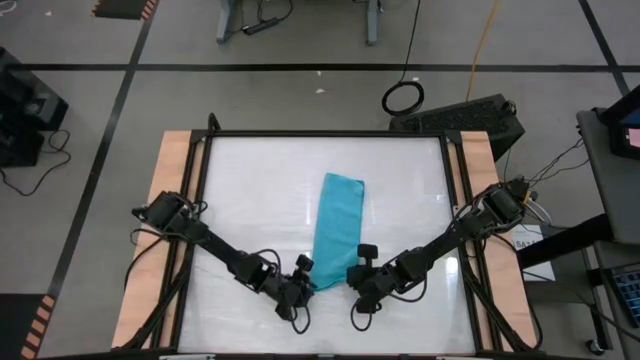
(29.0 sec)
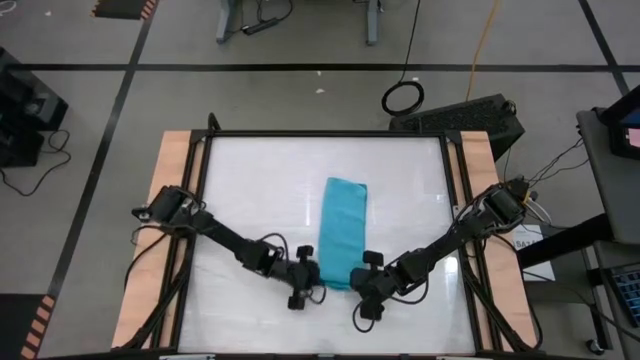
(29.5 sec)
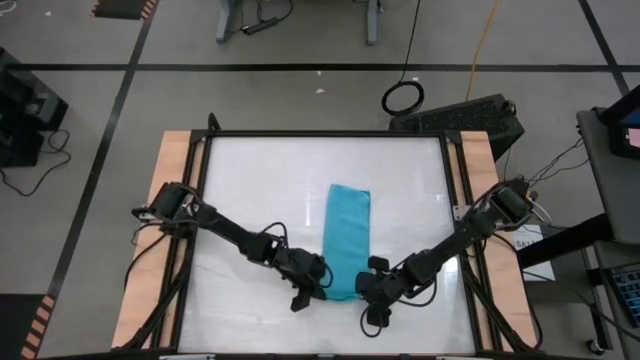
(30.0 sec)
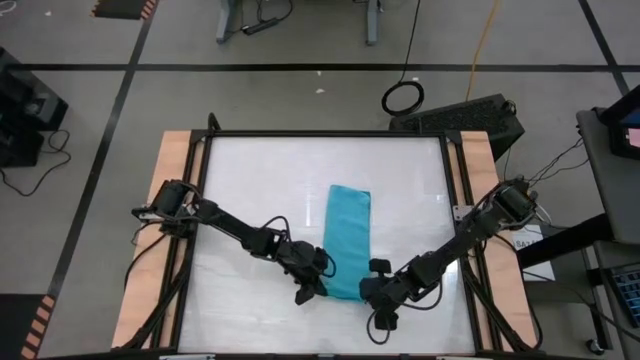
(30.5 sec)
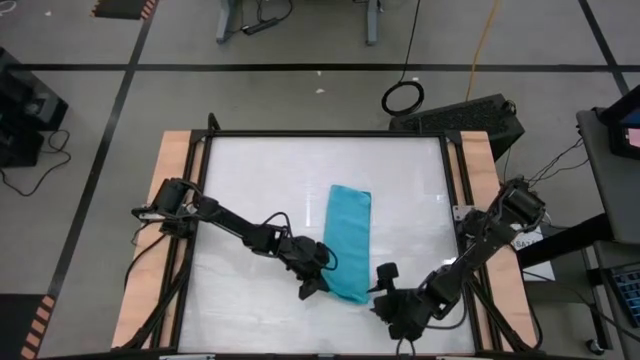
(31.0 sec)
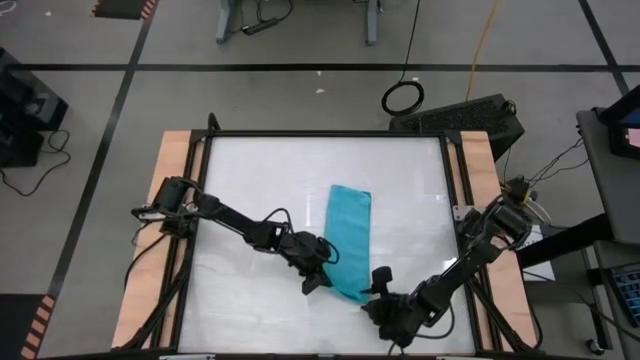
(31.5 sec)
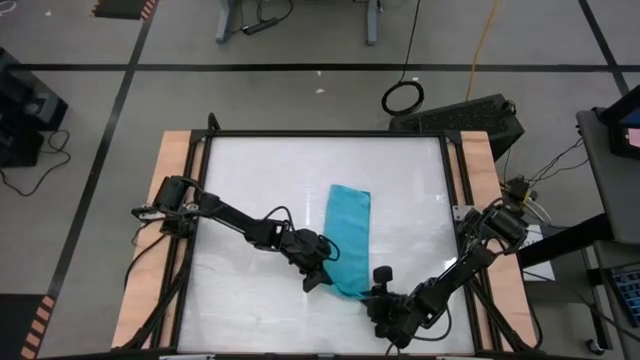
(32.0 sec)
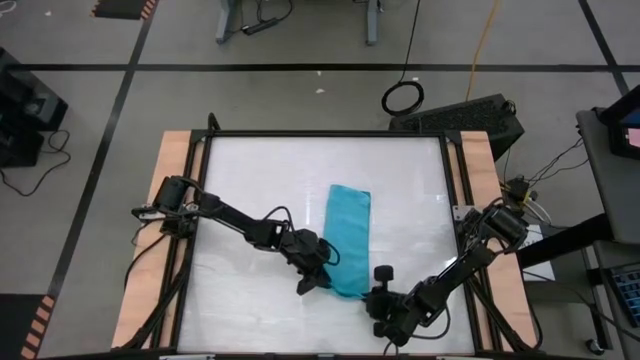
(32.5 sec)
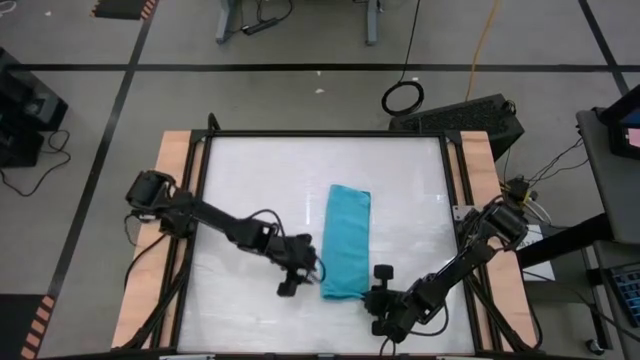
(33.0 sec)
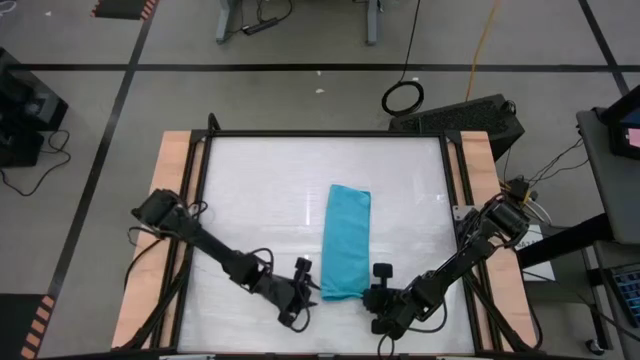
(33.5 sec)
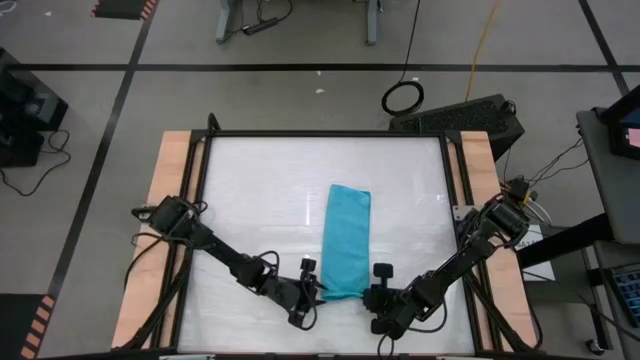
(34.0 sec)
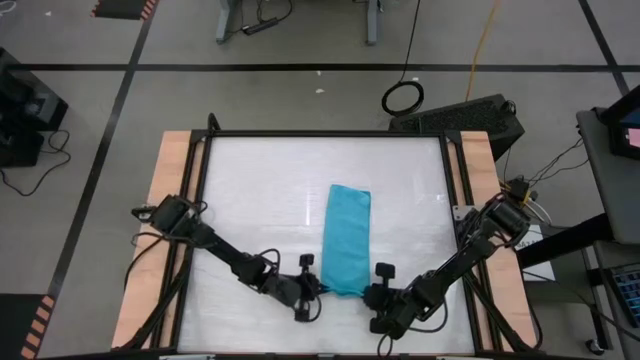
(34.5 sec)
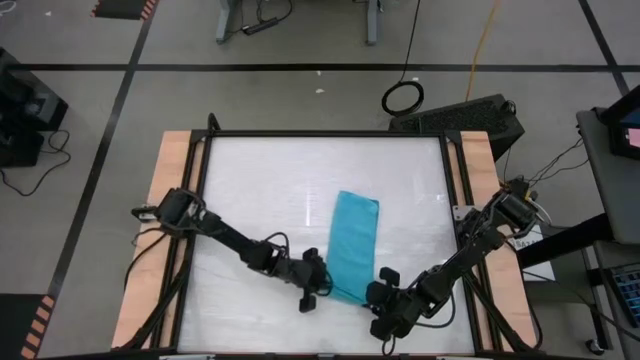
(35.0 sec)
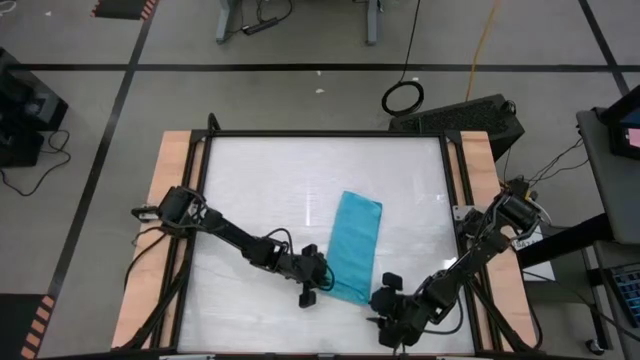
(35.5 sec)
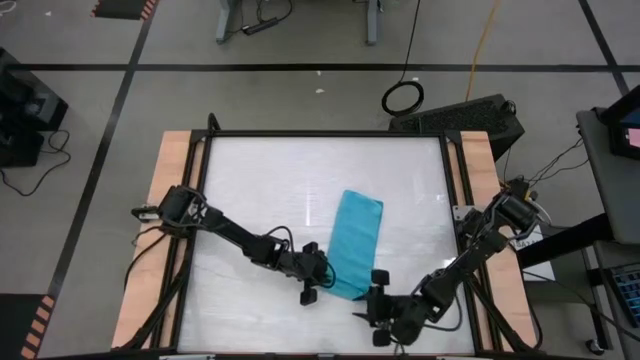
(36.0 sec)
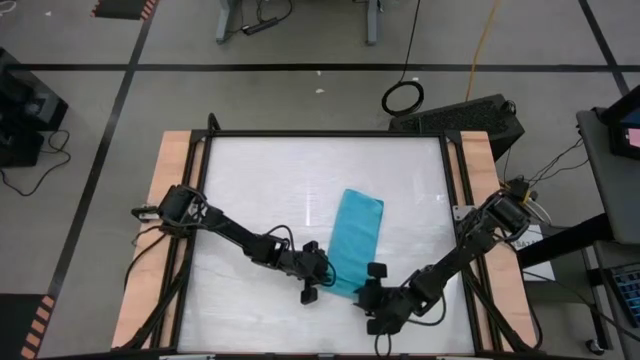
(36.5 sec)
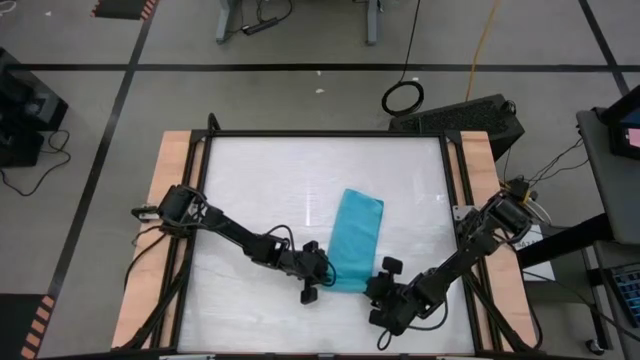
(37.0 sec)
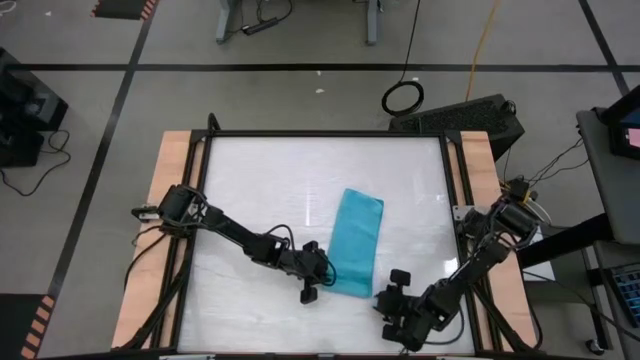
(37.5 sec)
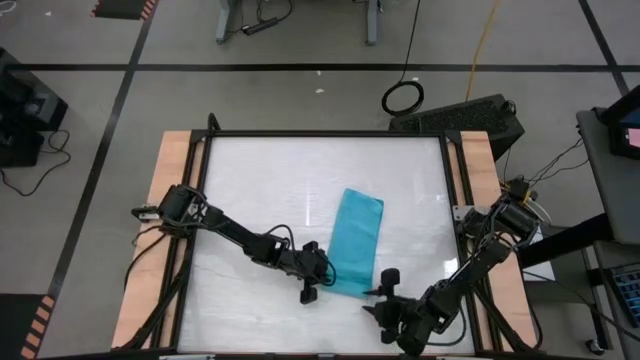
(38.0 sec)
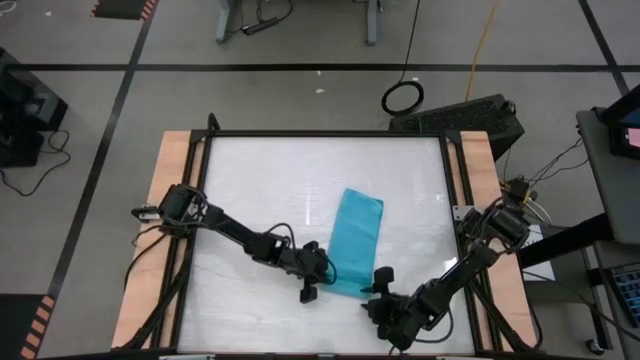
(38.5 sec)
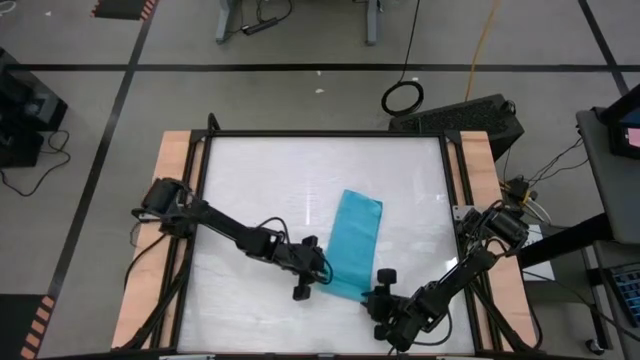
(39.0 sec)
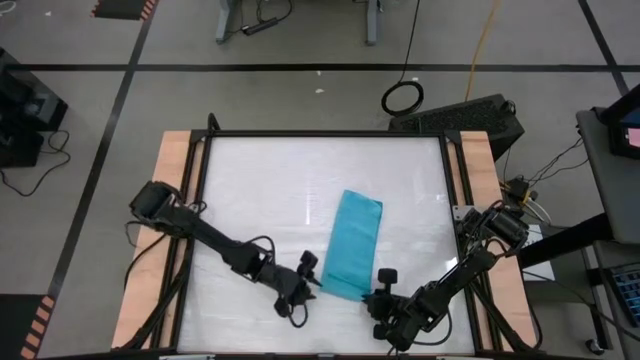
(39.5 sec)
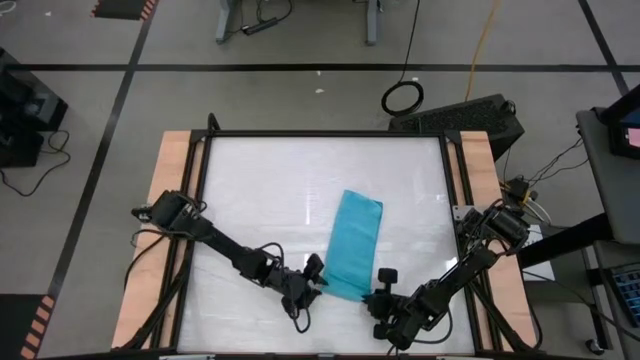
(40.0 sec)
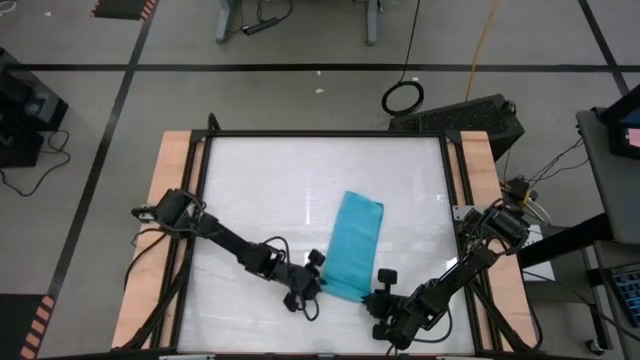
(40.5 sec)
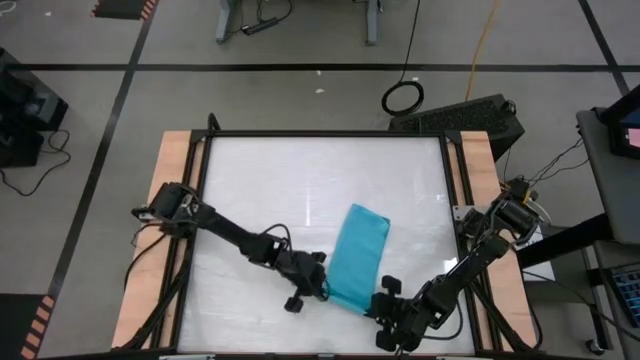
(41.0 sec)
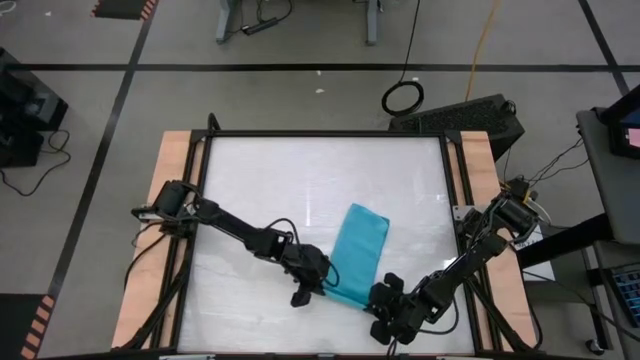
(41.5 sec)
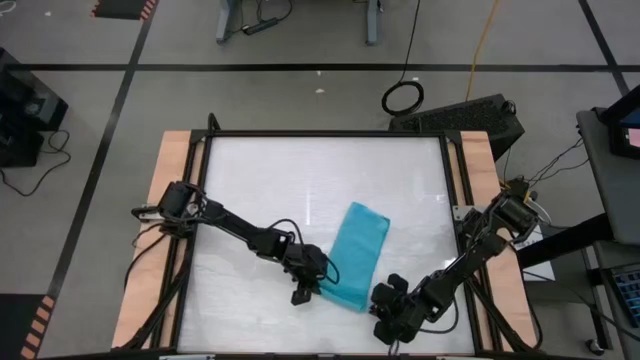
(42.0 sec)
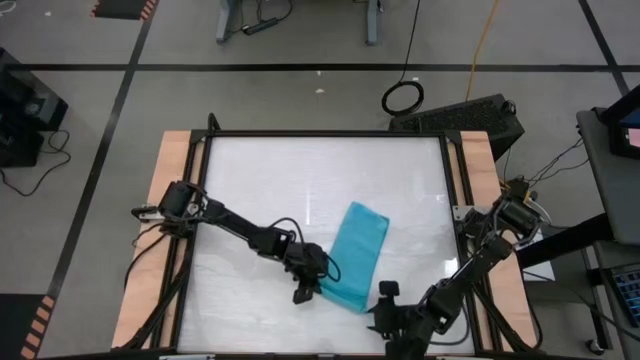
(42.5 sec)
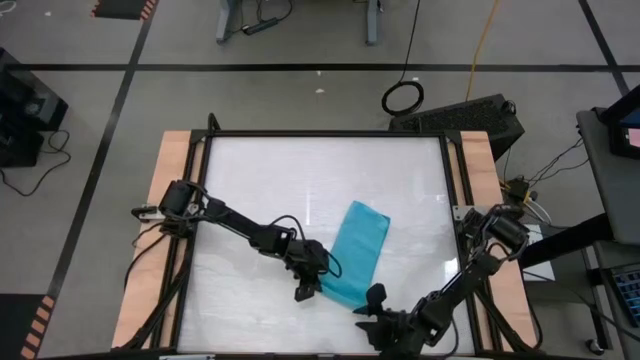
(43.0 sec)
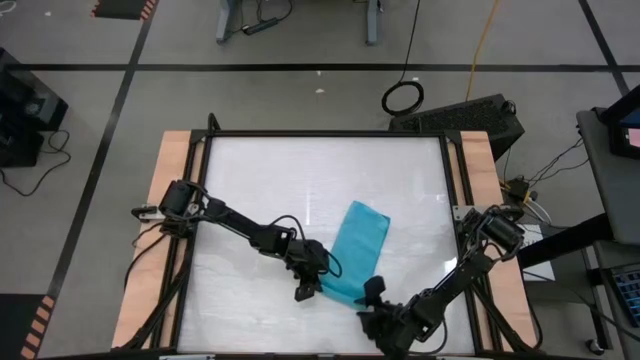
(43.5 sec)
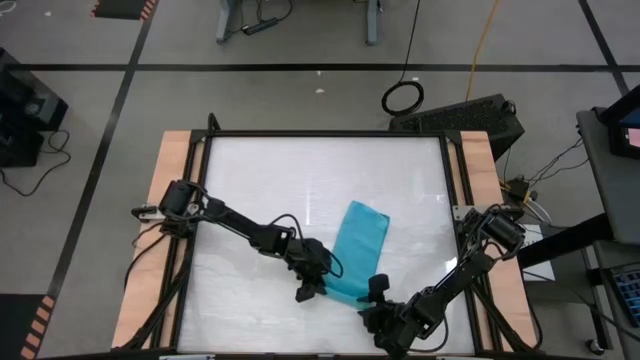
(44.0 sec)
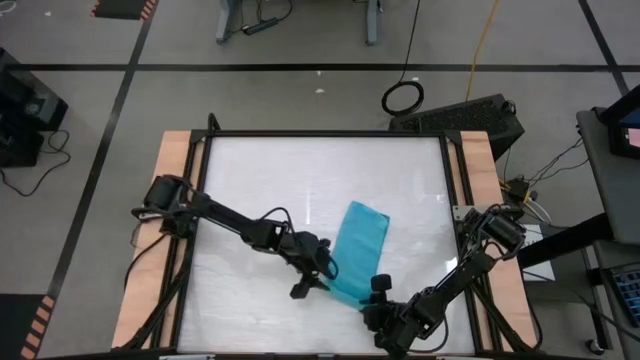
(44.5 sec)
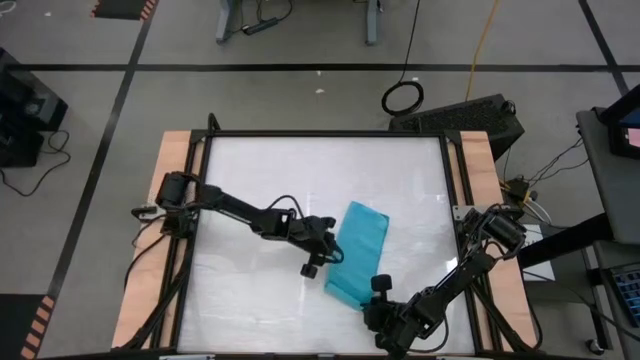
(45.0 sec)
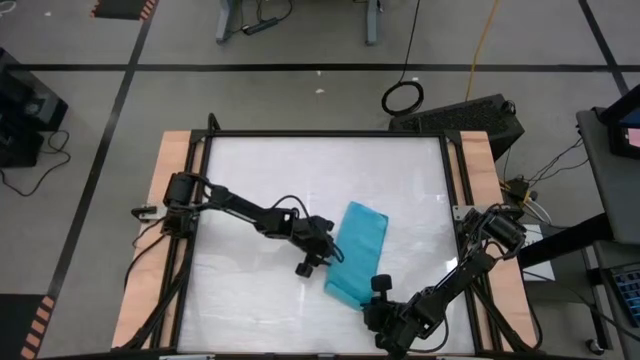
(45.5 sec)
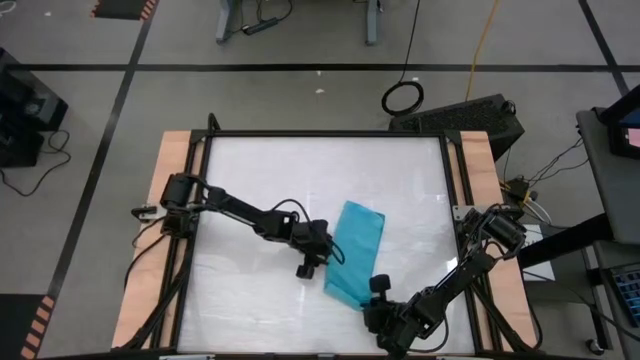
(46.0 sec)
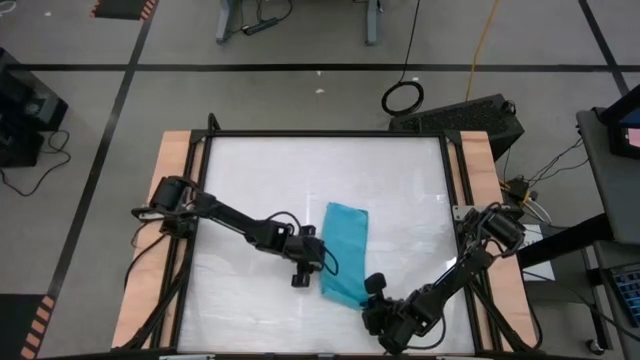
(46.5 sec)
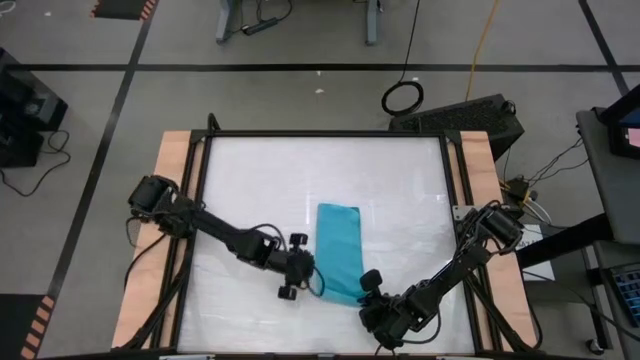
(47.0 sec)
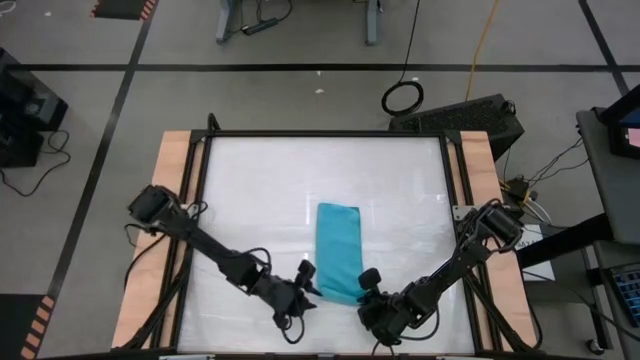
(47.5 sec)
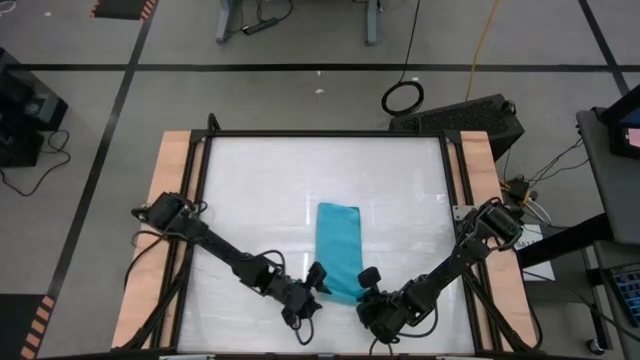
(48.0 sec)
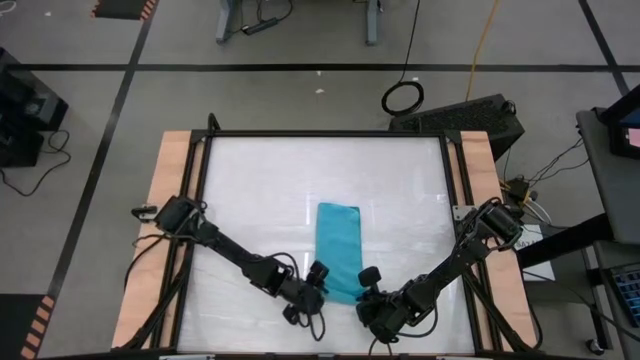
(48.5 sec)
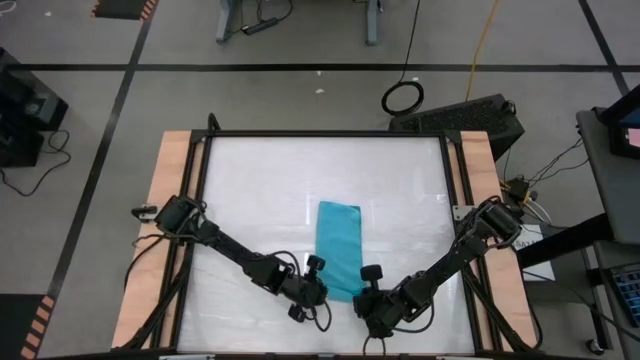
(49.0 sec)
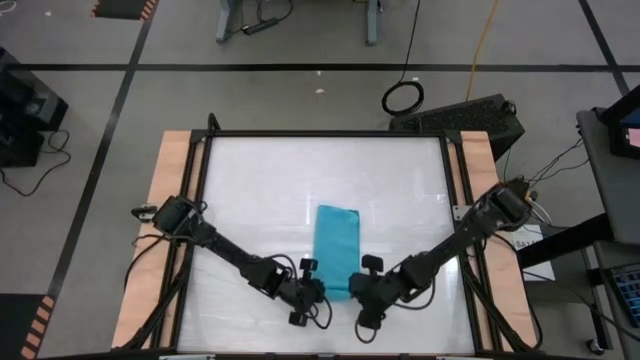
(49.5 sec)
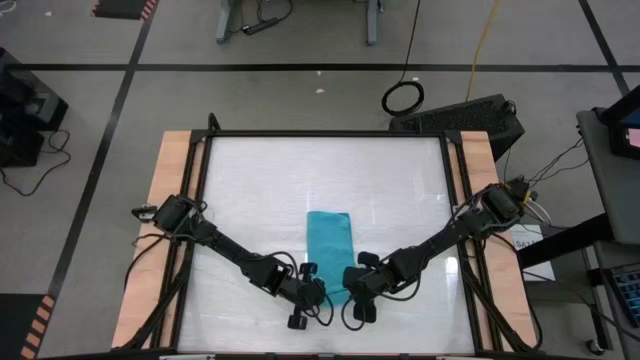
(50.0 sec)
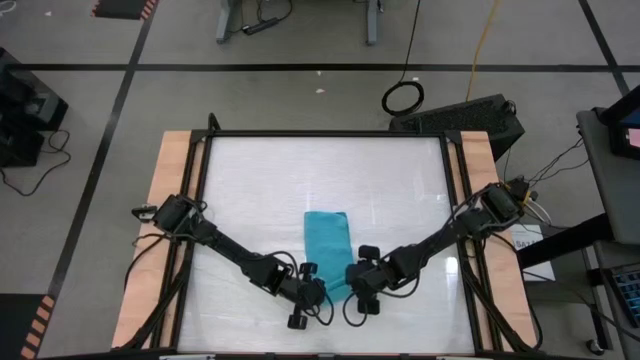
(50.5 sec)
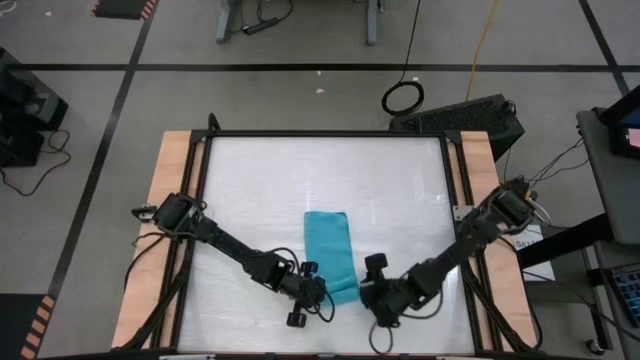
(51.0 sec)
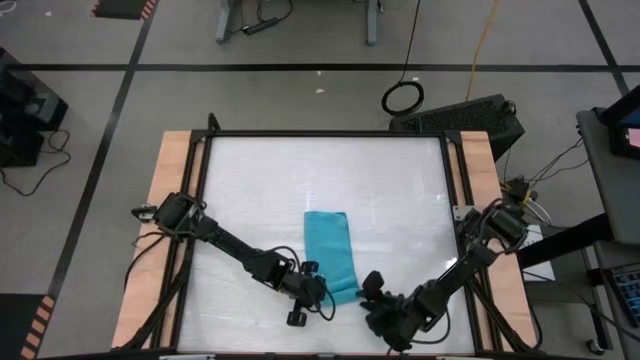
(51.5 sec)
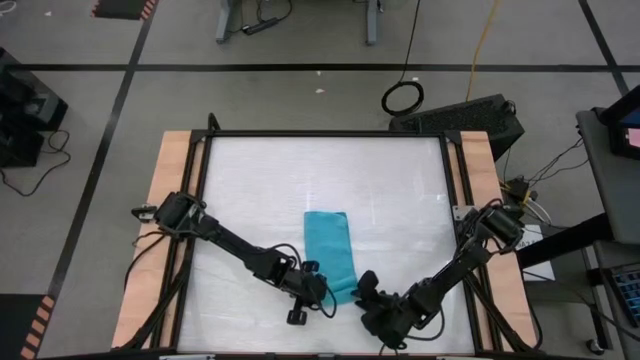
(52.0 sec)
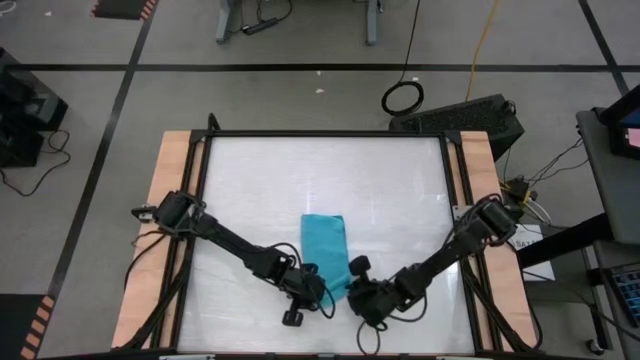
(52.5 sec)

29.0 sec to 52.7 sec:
Task: Roll towel into tight, uniform cylinder
Roll the blue microfiber towel
